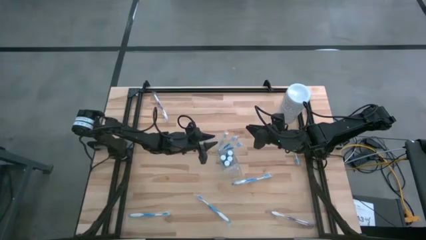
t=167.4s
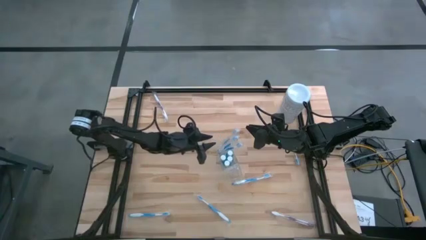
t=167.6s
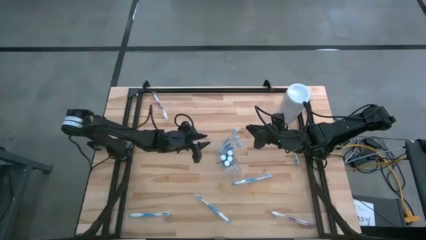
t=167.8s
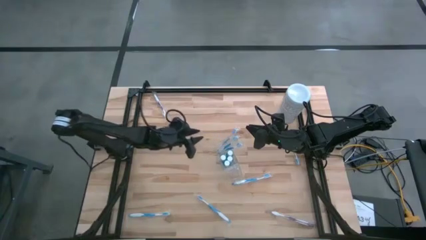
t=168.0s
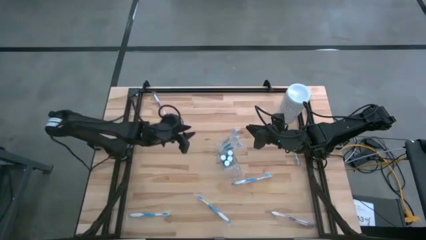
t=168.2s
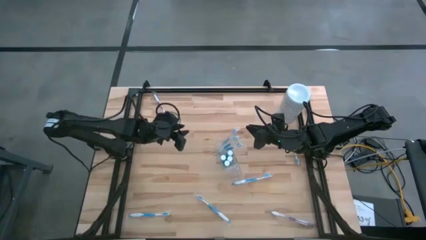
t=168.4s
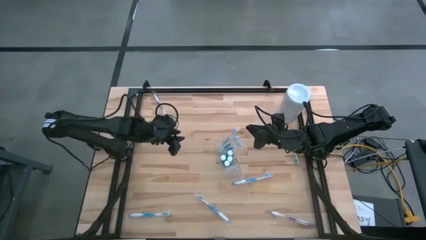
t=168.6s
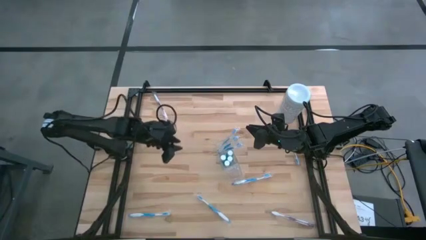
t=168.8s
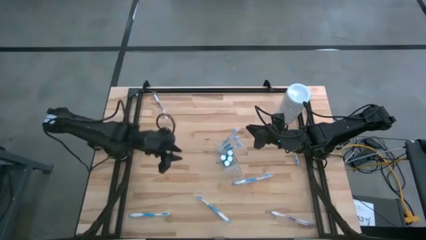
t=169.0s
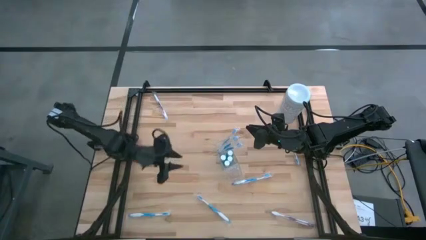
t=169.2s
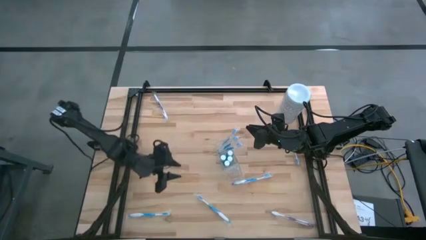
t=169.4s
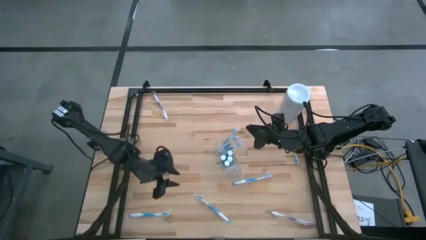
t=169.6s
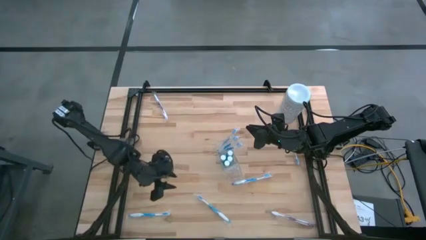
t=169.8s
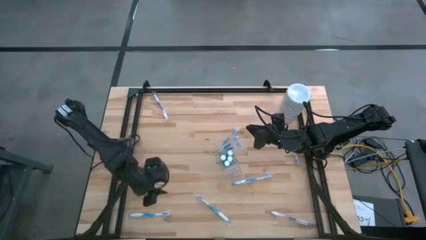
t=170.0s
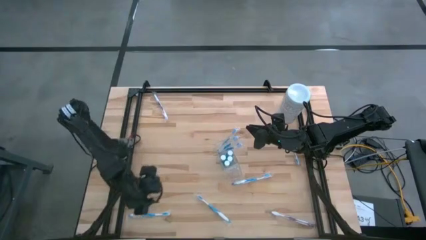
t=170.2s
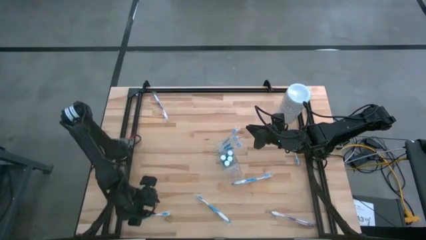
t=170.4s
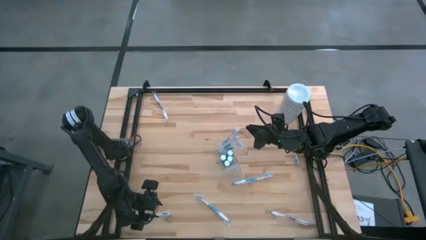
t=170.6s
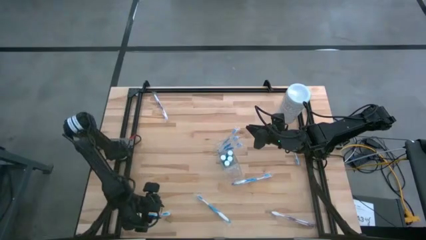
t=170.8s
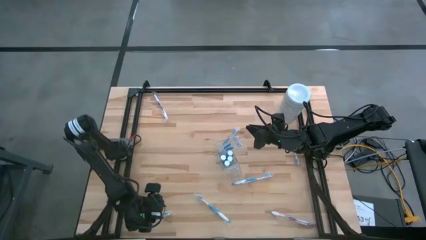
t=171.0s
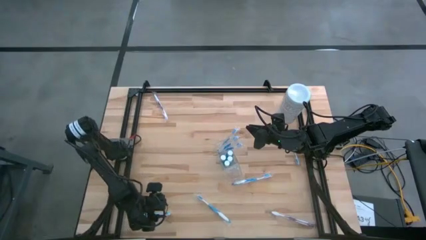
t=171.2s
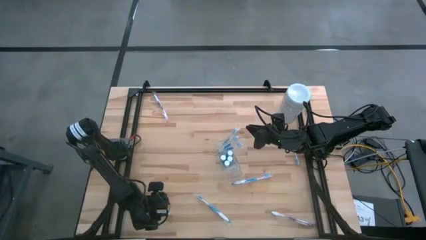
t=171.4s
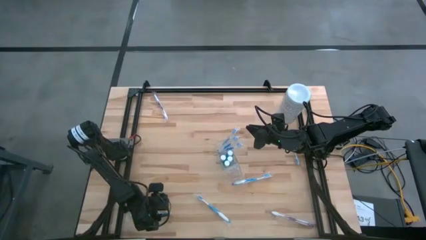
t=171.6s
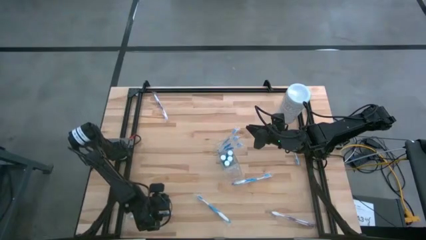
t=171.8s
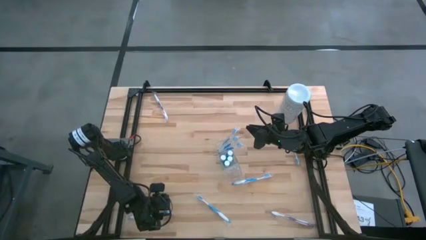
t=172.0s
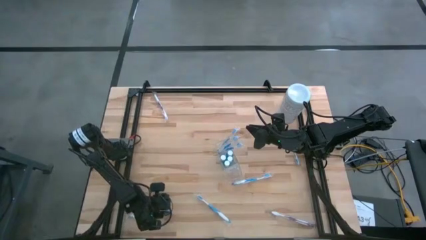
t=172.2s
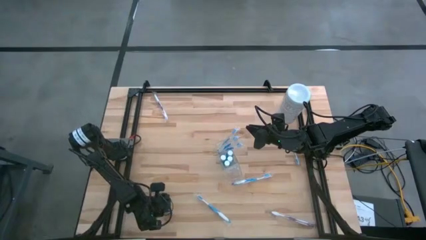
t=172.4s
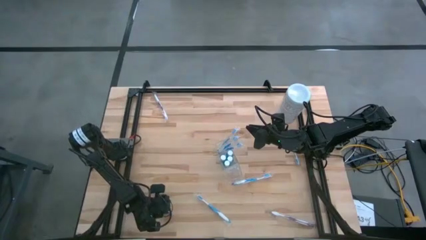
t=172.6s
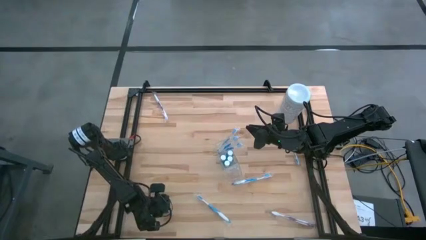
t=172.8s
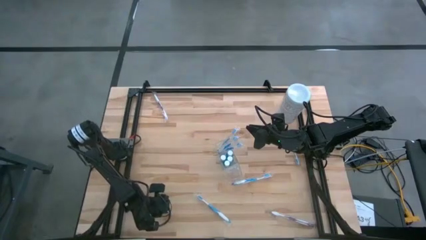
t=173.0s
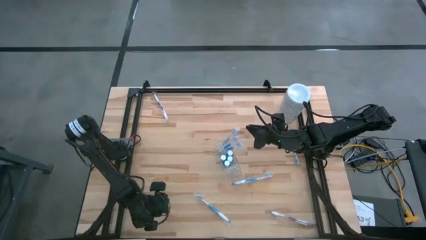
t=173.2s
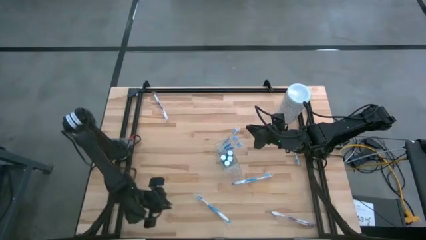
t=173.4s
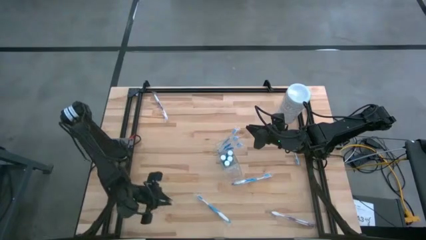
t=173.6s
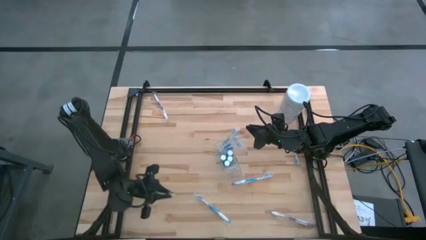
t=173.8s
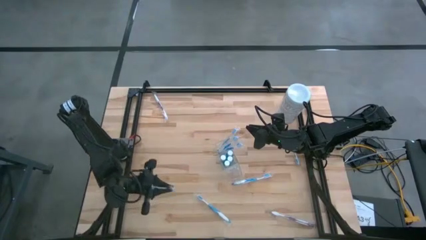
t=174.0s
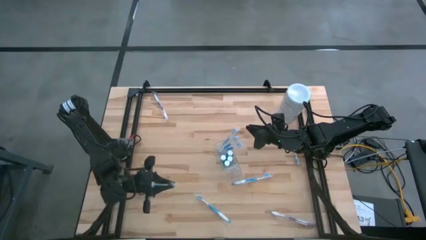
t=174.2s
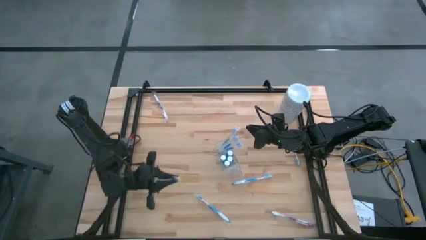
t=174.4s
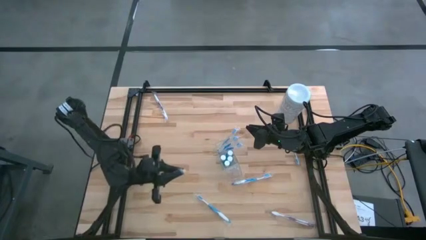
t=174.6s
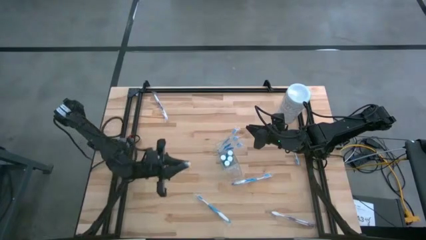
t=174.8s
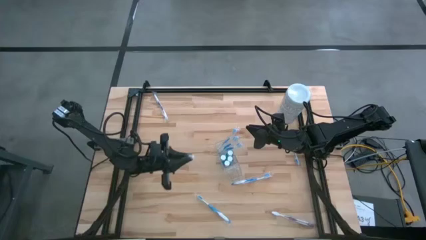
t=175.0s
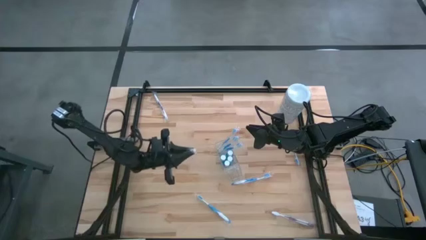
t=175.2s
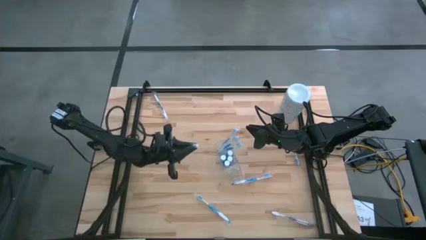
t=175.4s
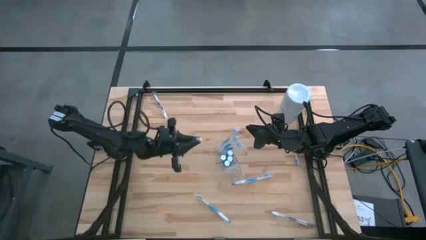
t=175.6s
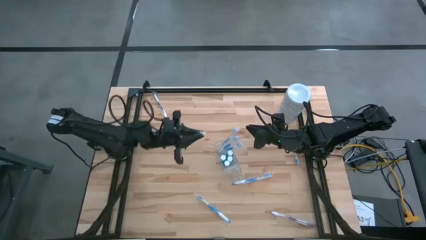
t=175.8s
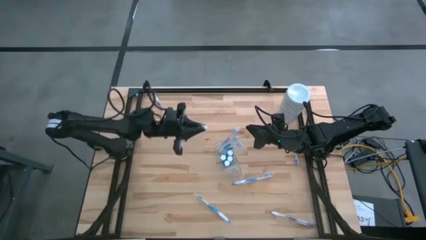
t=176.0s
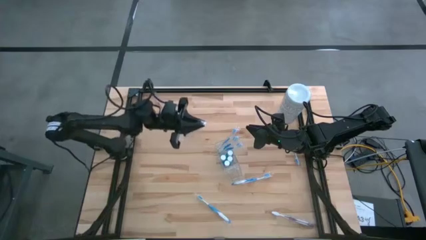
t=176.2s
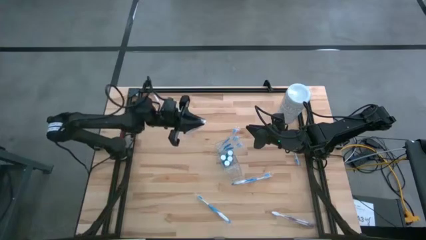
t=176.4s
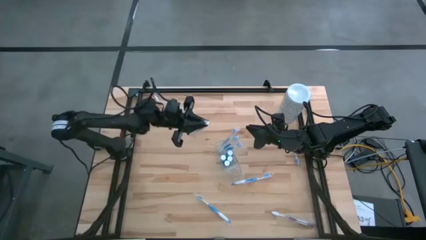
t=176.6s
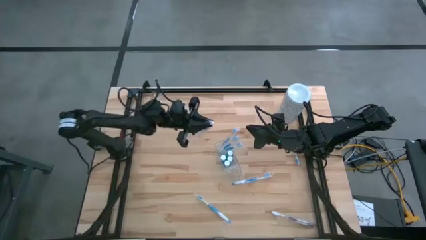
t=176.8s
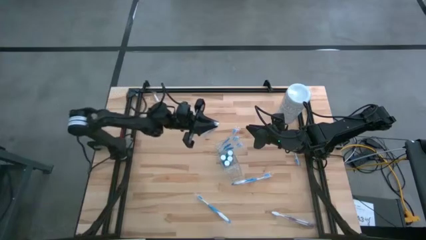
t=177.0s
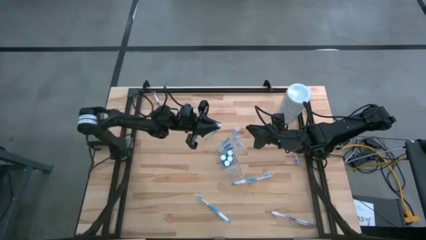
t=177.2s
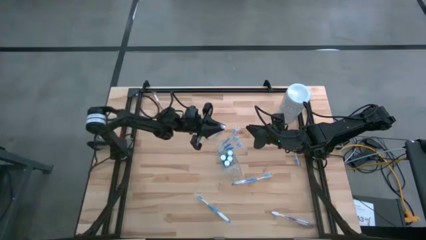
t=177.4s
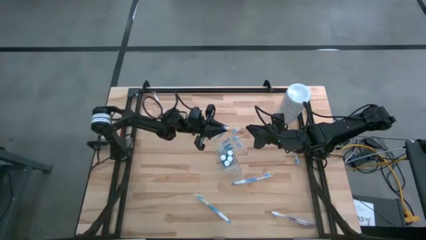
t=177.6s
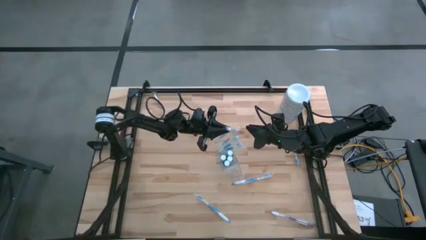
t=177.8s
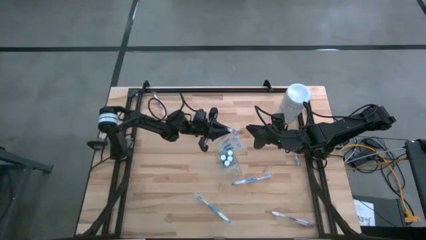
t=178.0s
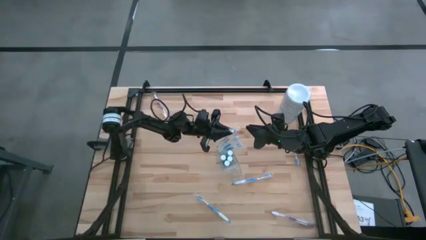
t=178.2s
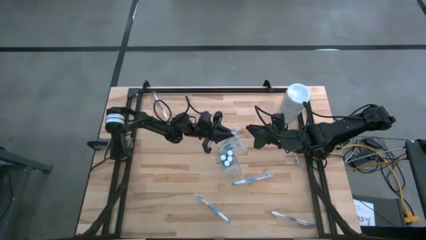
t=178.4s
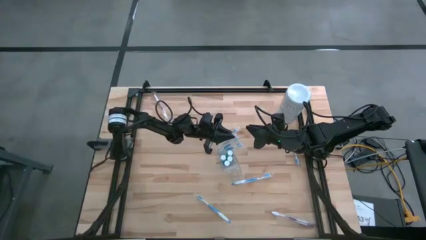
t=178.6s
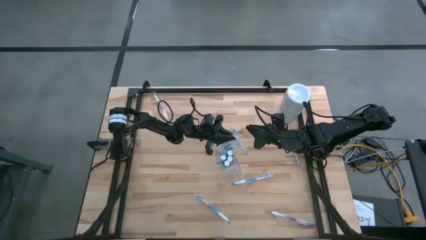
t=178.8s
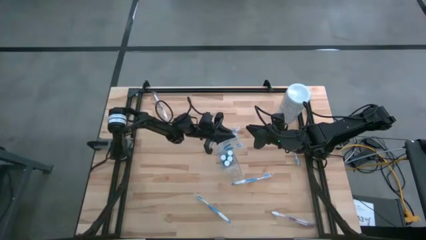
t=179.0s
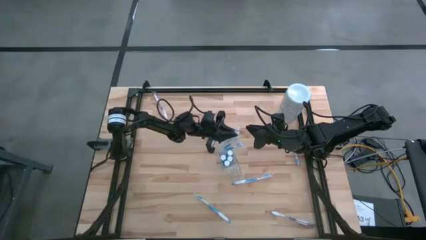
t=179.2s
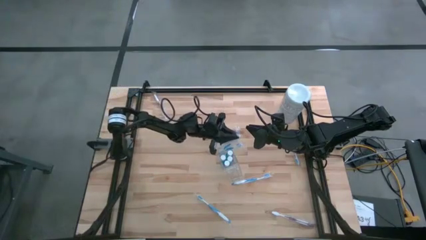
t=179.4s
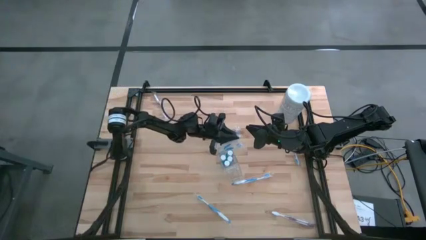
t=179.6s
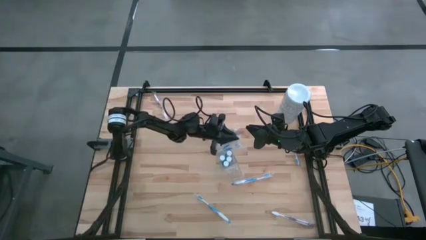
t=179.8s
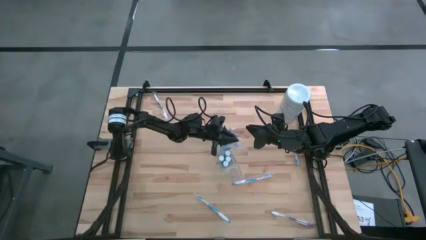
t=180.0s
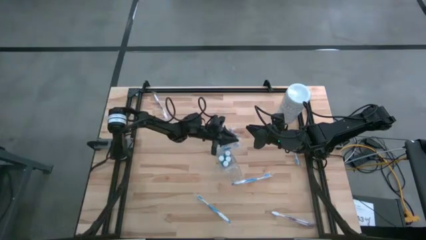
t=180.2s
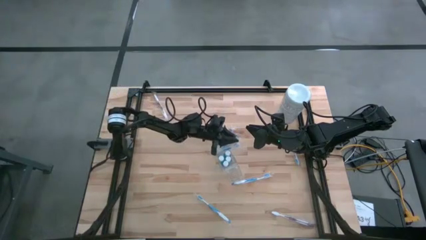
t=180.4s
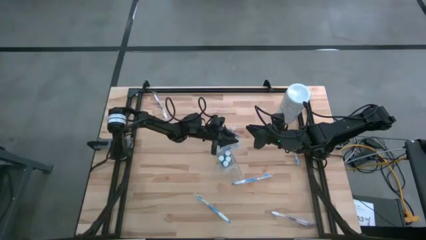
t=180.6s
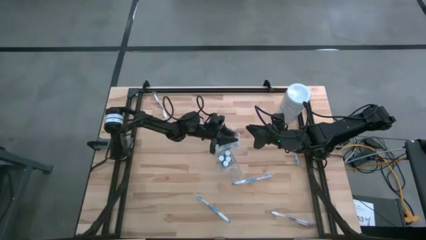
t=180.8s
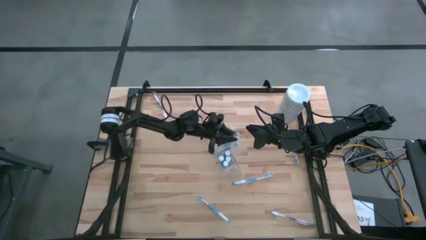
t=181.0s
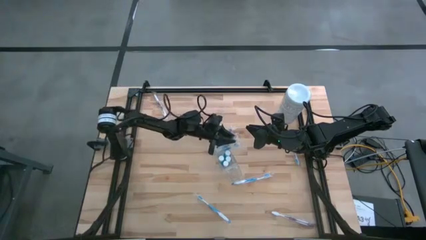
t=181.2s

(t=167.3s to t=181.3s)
Task: Pick & Place toothbrushing station
Put the blue toothbrush into the left section of the transparent organizer
